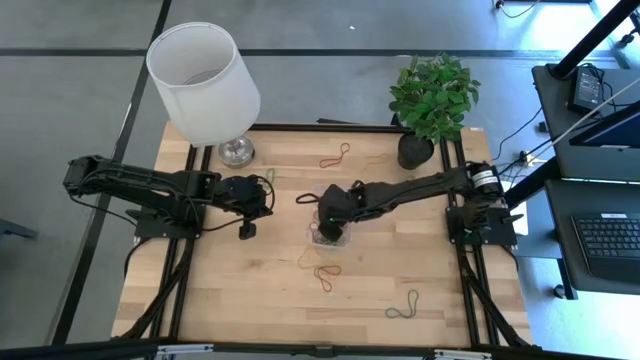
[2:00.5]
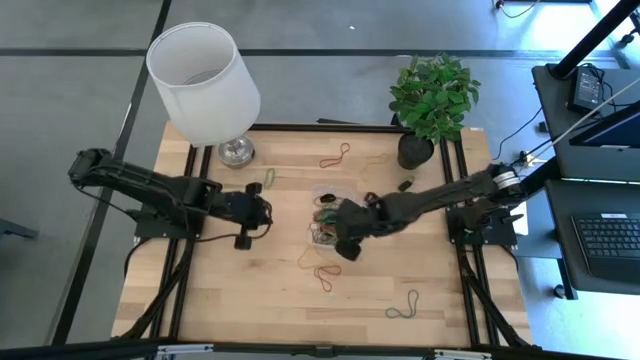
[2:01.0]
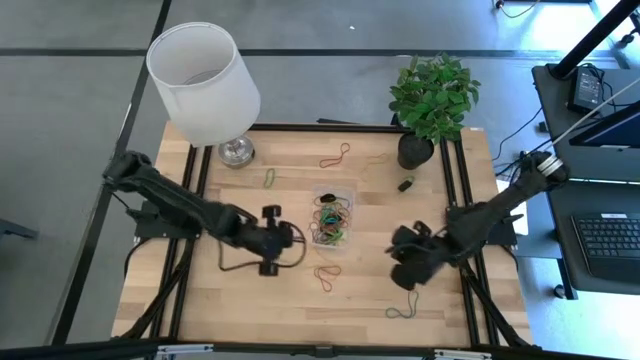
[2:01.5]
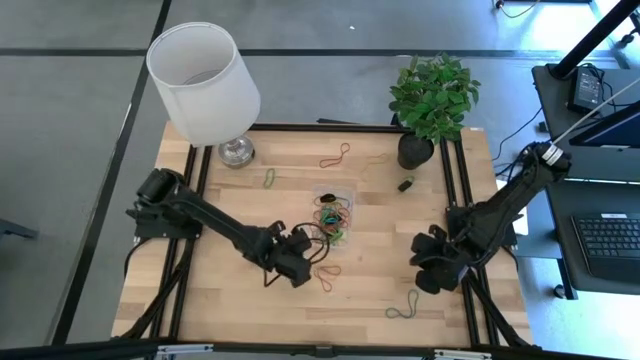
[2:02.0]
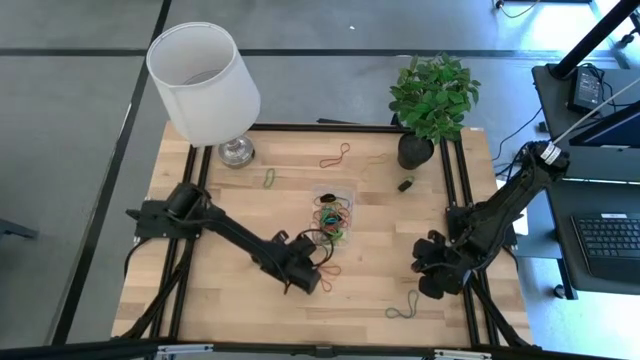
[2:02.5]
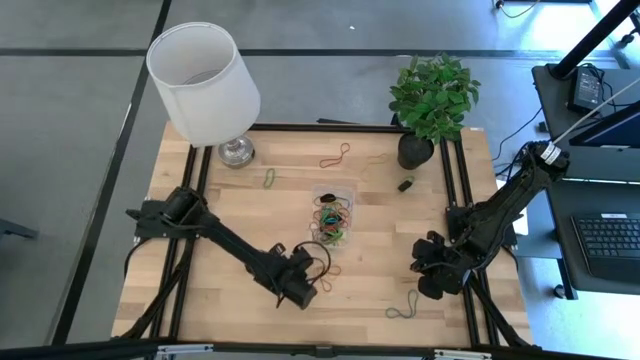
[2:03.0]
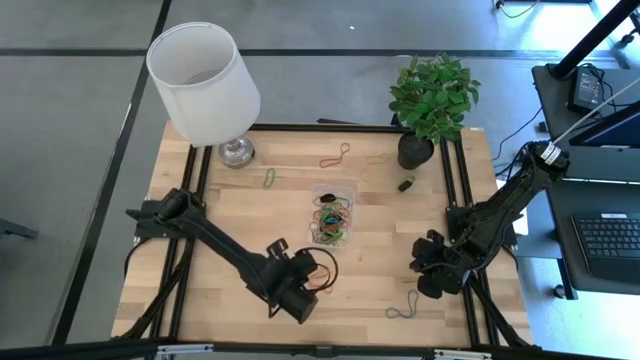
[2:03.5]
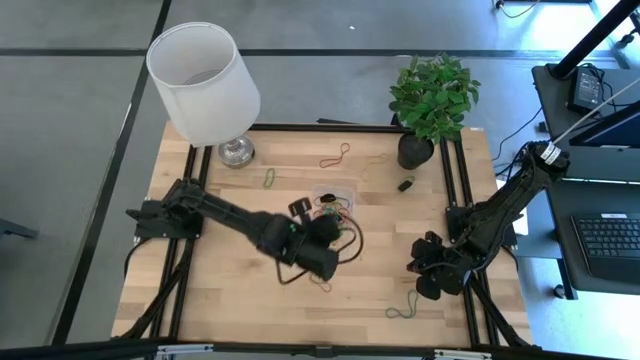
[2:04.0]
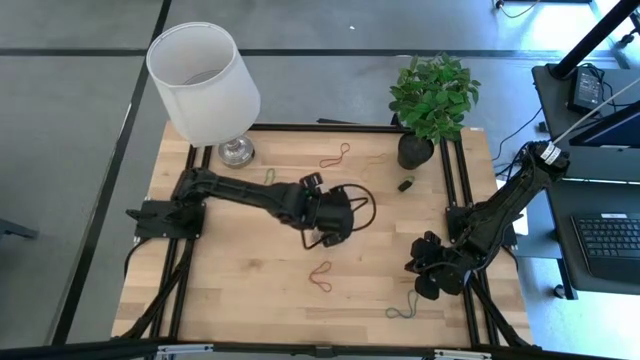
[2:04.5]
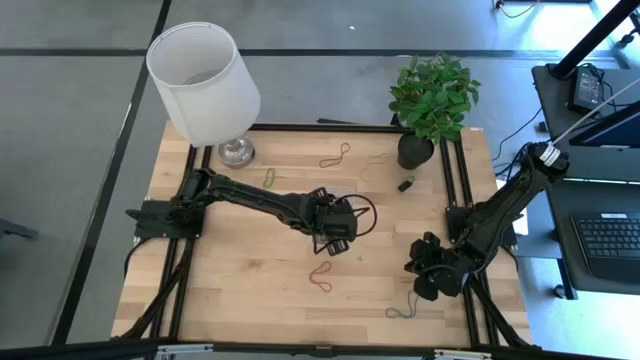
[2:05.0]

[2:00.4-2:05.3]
Task: Pick and place rubber bands into bin
Put the bottom yellow rubber band into the bin

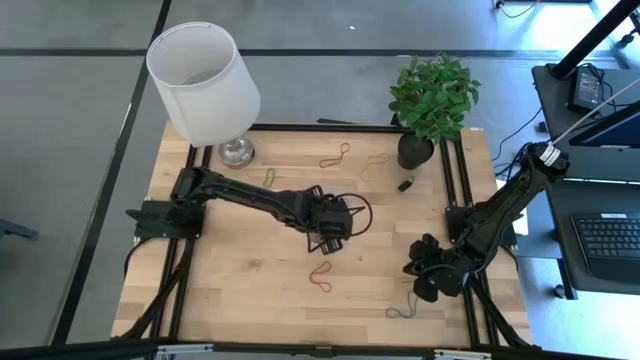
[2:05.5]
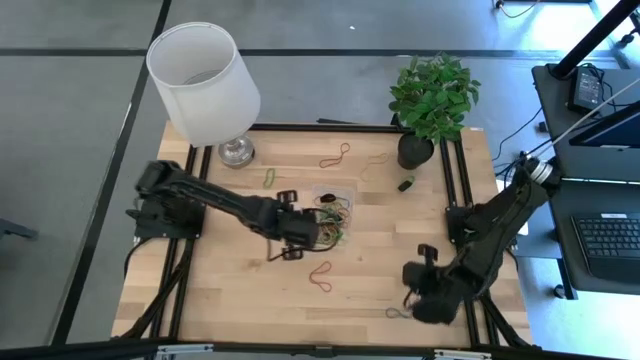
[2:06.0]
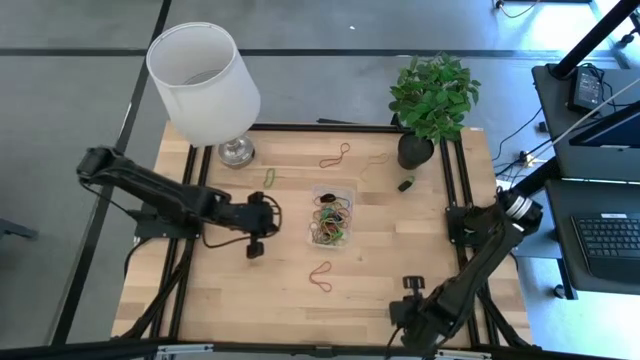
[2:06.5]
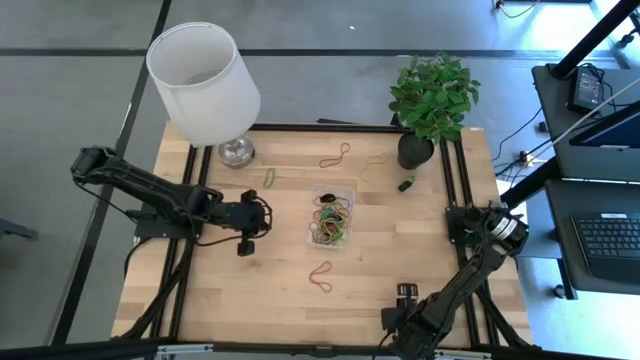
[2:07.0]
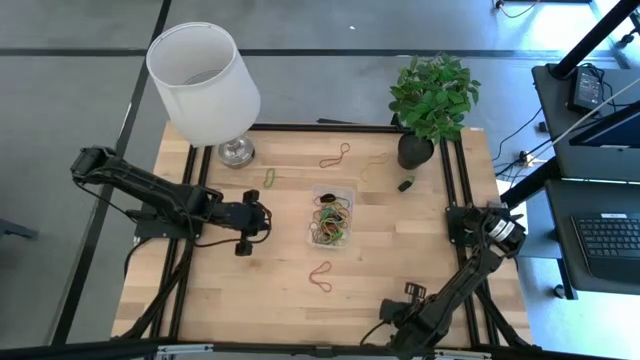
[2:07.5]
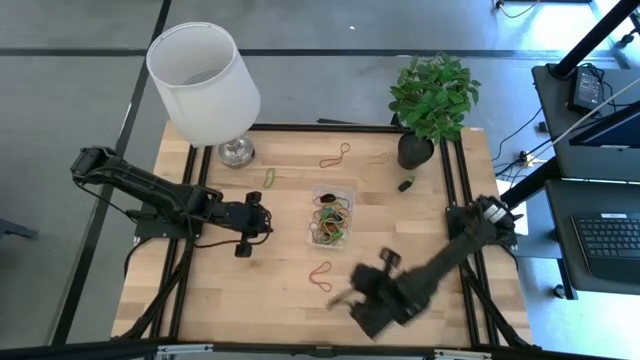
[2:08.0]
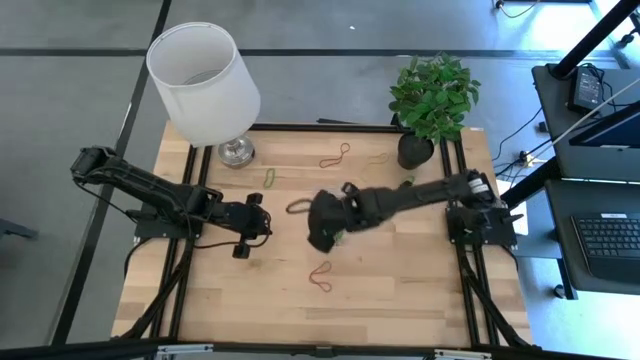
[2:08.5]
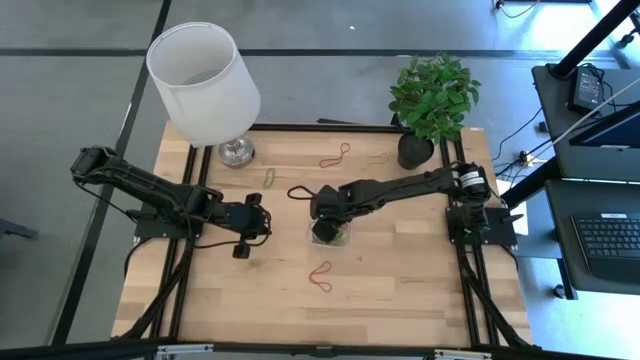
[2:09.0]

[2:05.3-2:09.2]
Put the blue rubber band into the bin

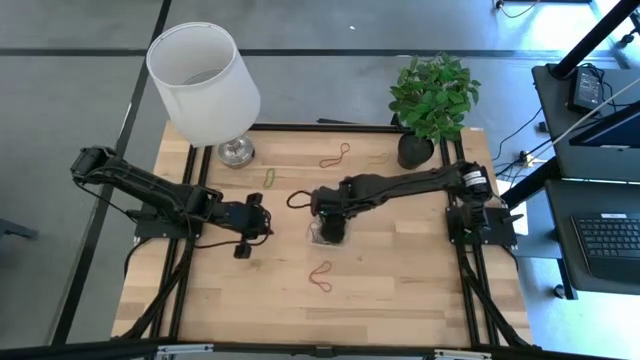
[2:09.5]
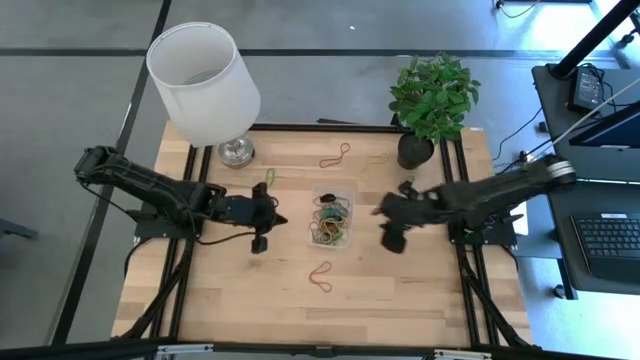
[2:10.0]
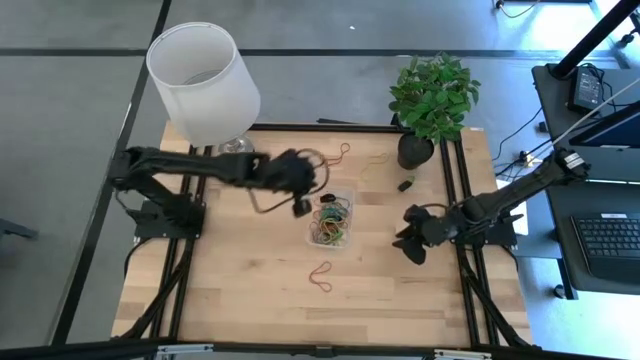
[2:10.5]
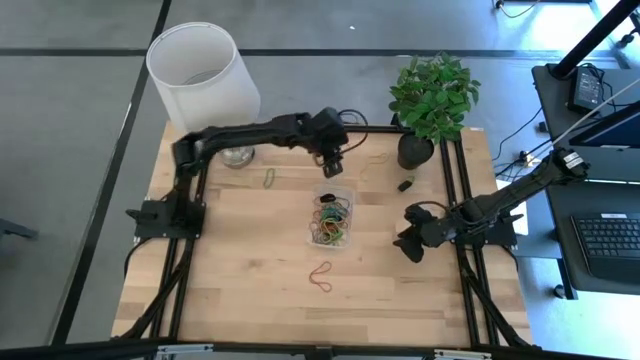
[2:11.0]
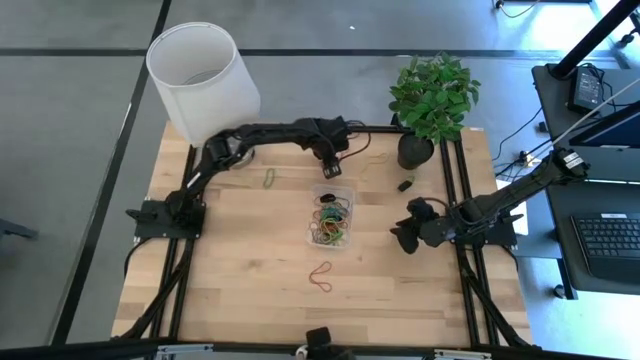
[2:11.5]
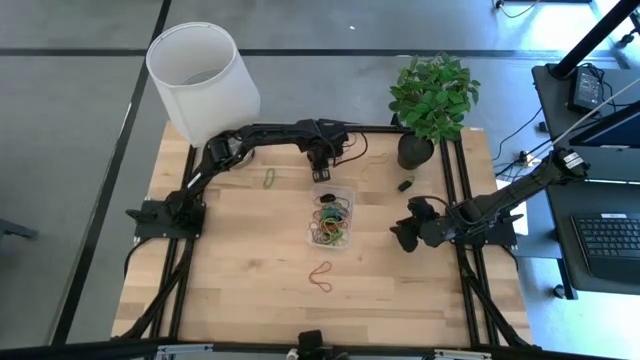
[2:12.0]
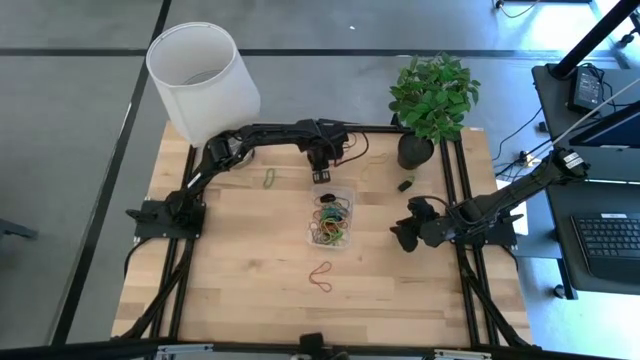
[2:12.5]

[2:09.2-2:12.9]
Put the top red rubber band into the bin

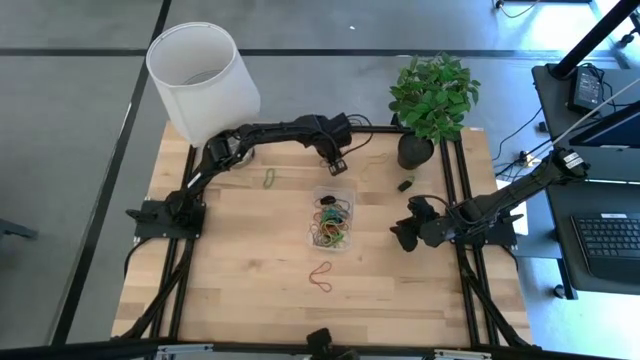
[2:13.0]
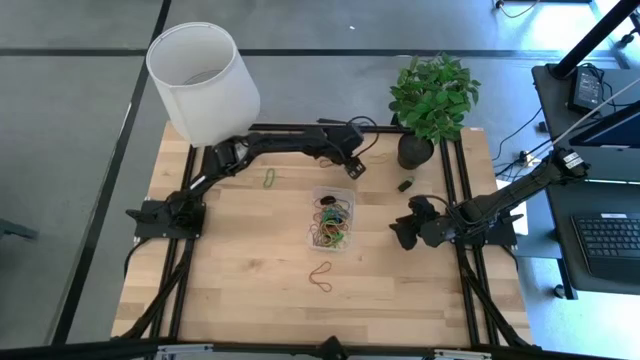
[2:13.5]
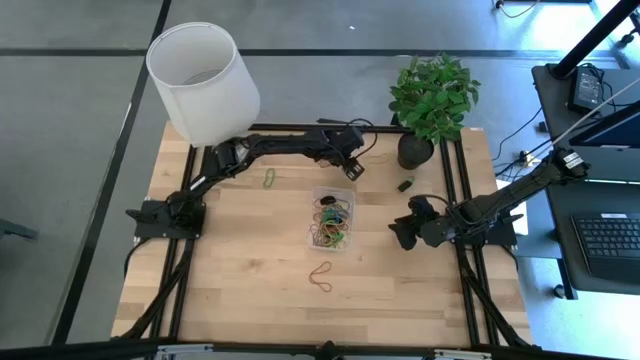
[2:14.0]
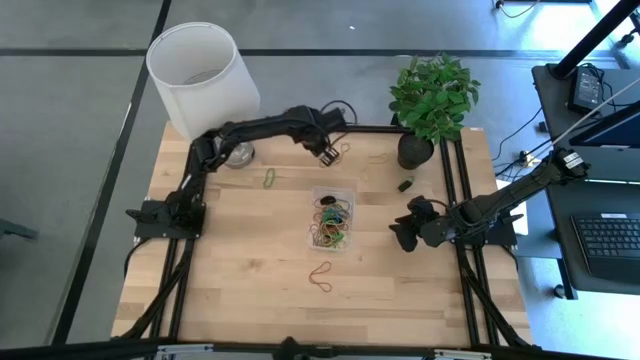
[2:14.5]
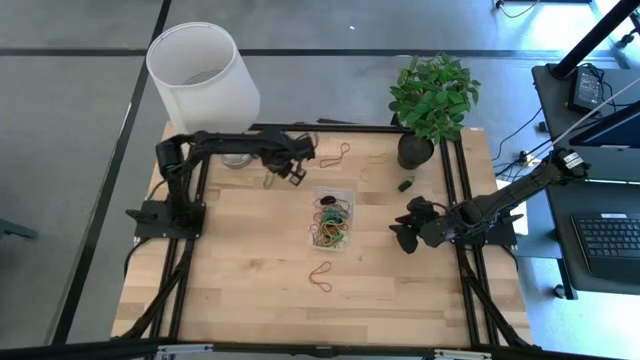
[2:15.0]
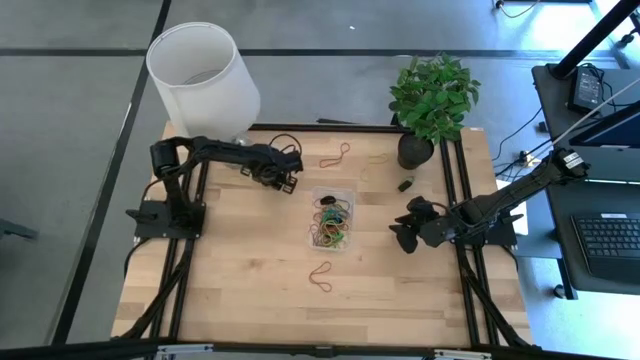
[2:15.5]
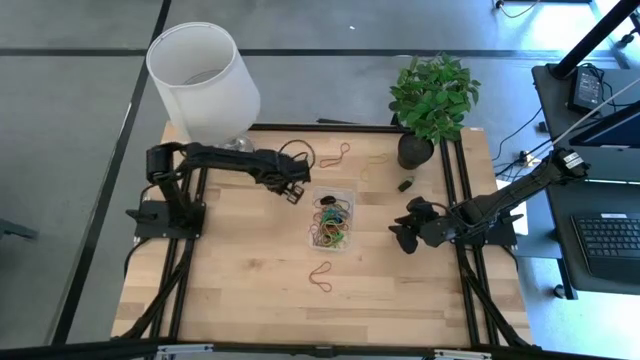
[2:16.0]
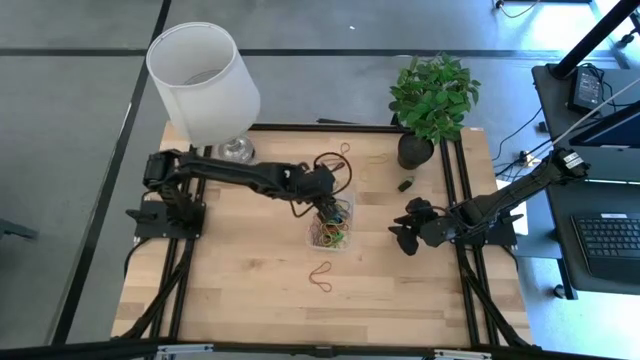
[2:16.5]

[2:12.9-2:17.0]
Put the left green rubber band into the bin

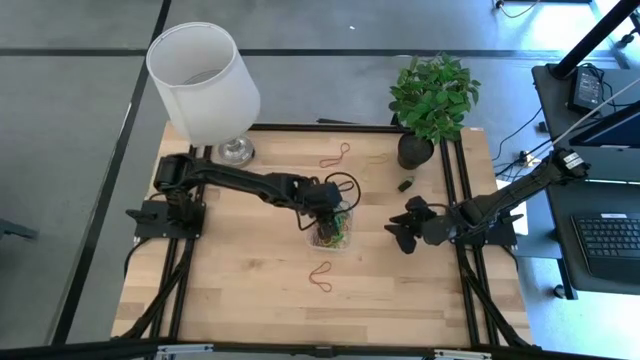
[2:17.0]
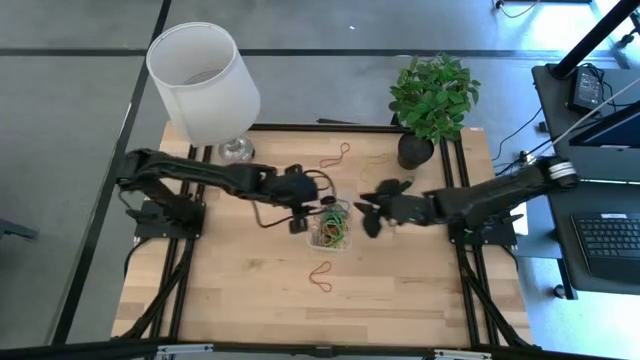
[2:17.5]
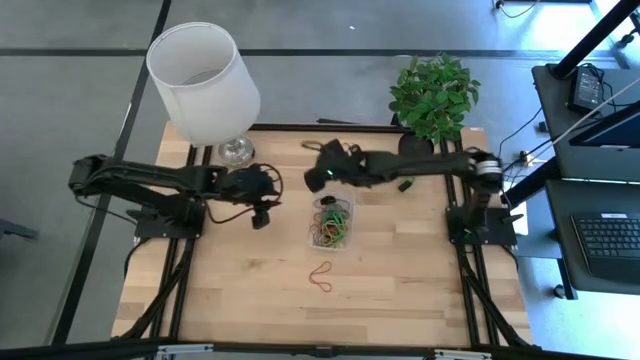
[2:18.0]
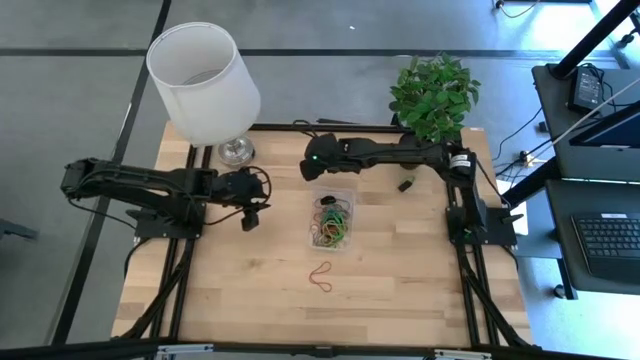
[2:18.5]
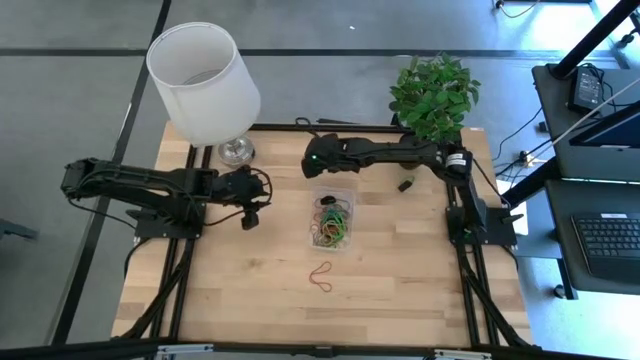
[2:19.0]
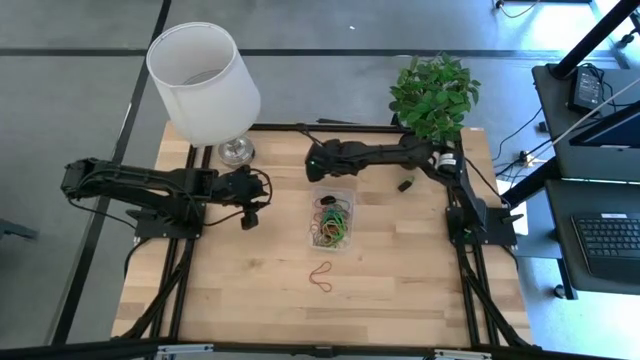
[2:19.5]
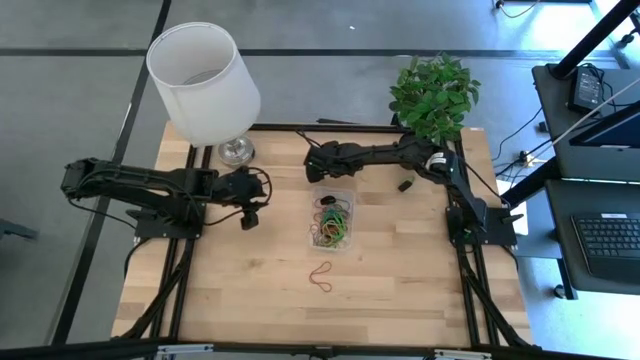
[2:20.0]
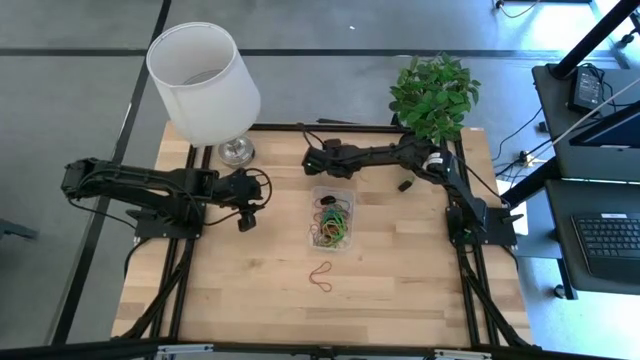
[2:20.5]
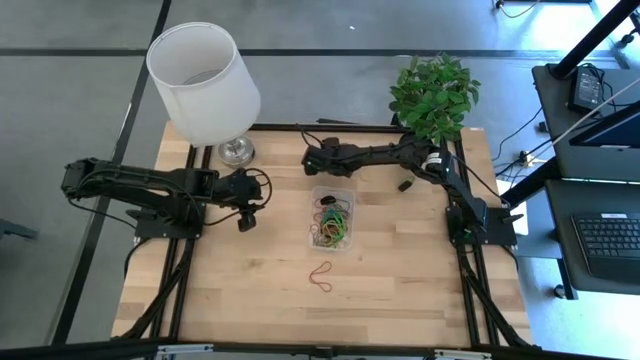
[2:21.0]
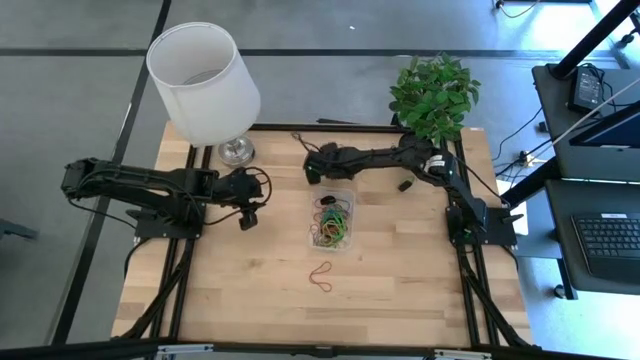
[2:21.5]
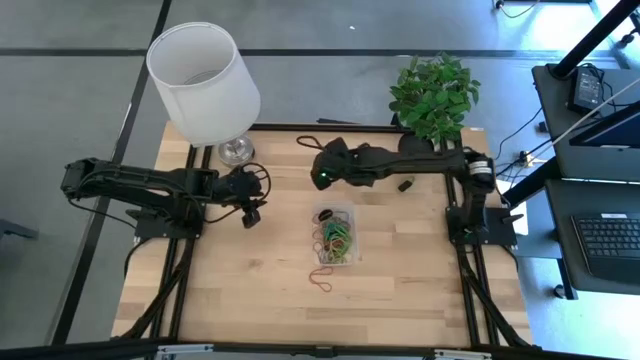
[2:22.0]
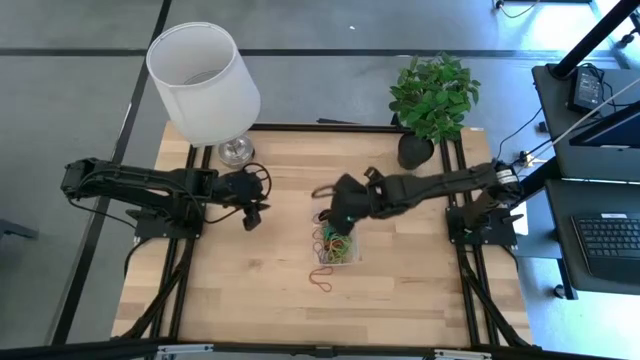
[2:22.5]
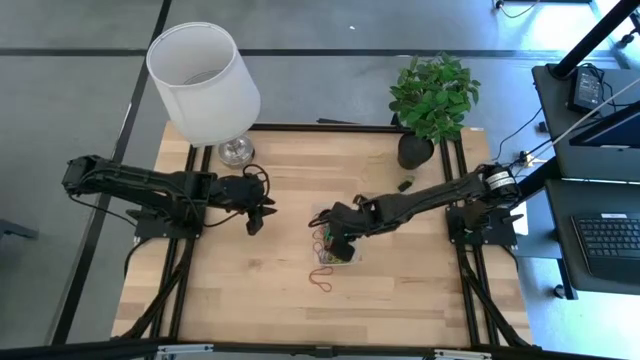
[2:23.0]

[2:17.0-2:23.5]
Put the top red rubber band into the bin
